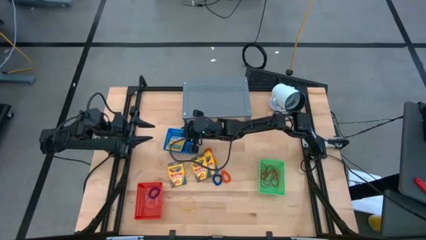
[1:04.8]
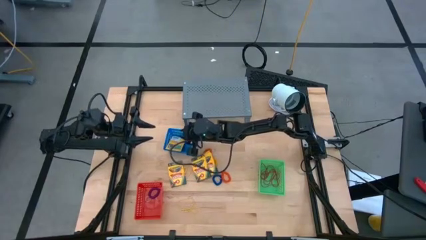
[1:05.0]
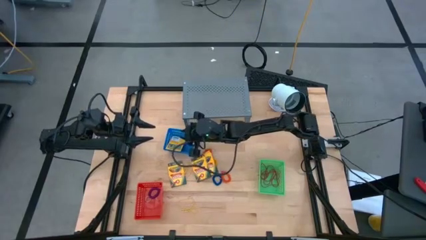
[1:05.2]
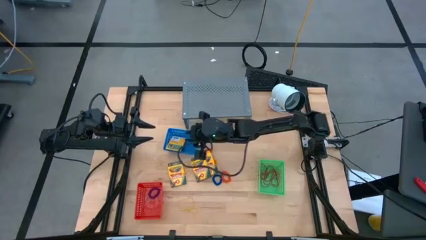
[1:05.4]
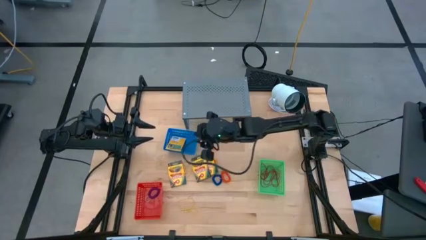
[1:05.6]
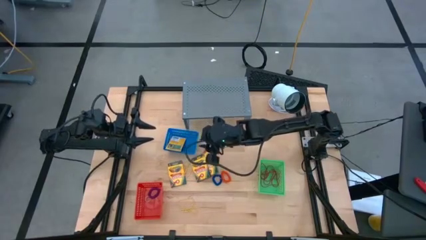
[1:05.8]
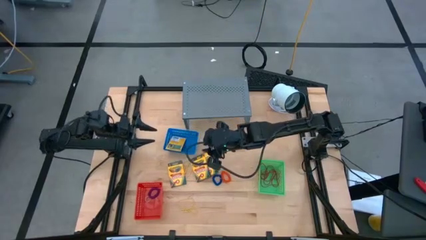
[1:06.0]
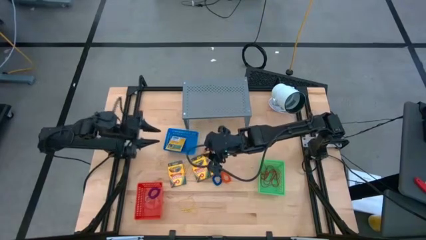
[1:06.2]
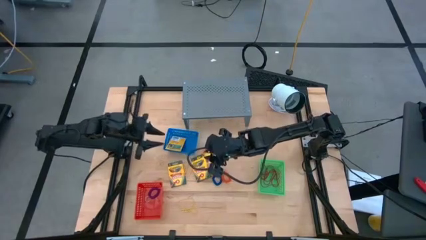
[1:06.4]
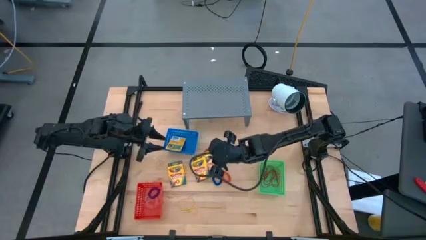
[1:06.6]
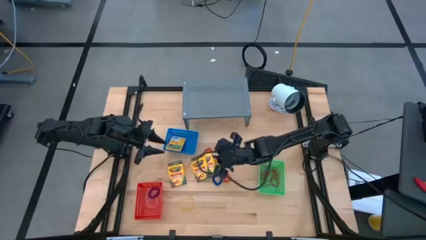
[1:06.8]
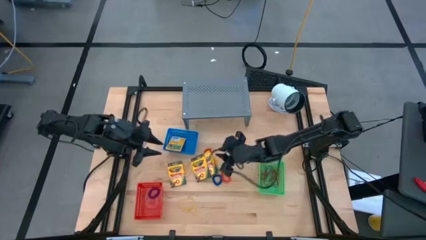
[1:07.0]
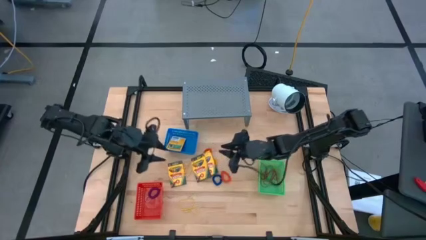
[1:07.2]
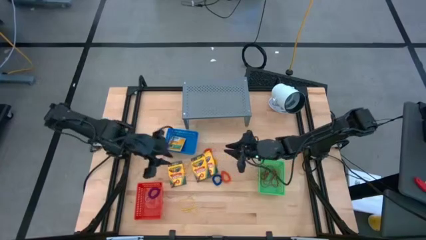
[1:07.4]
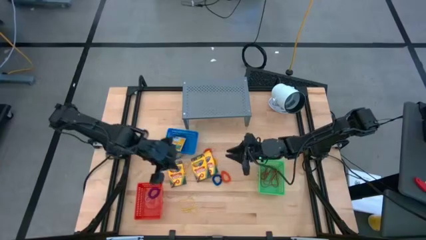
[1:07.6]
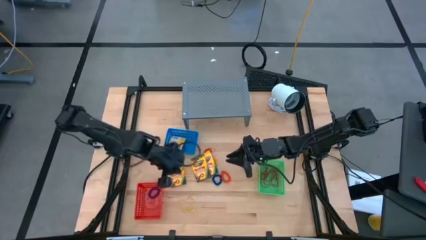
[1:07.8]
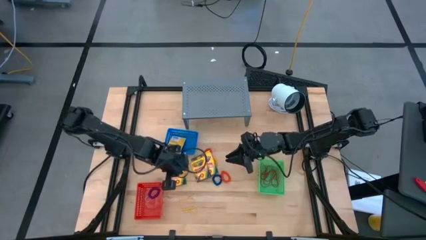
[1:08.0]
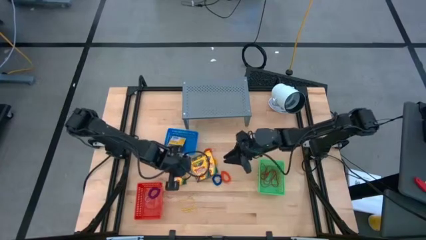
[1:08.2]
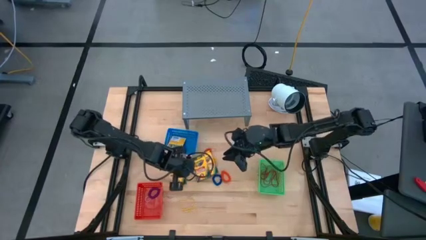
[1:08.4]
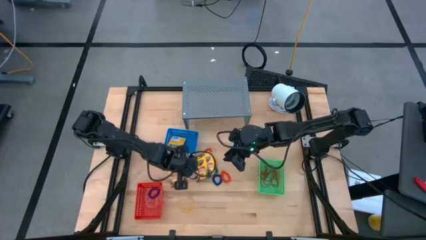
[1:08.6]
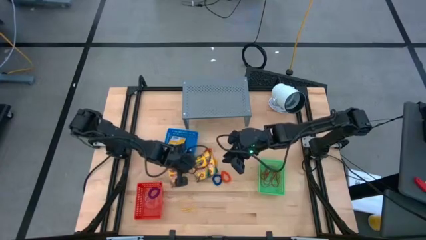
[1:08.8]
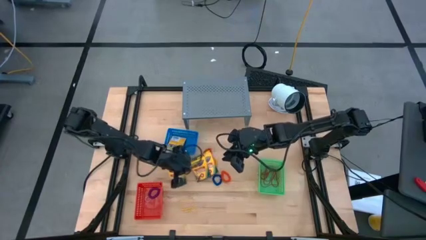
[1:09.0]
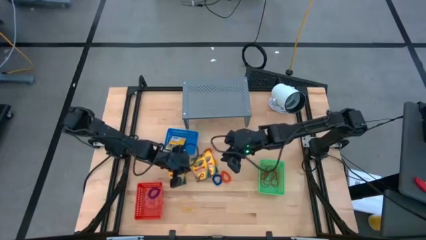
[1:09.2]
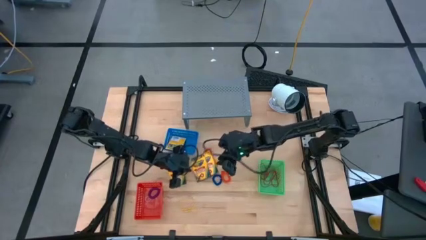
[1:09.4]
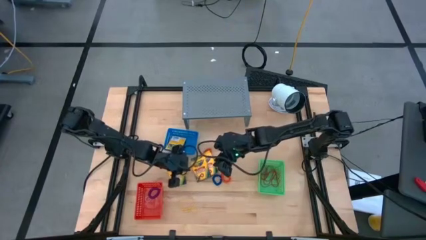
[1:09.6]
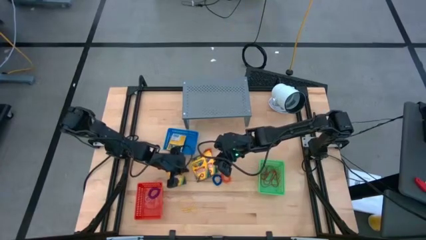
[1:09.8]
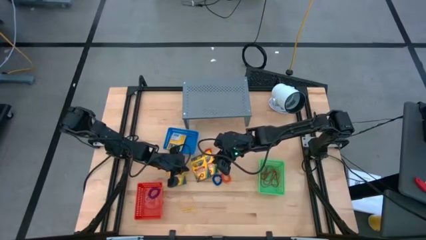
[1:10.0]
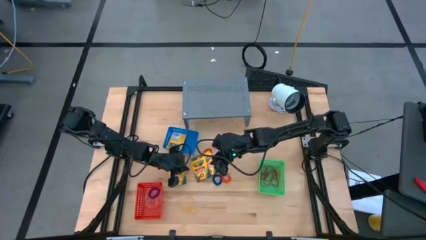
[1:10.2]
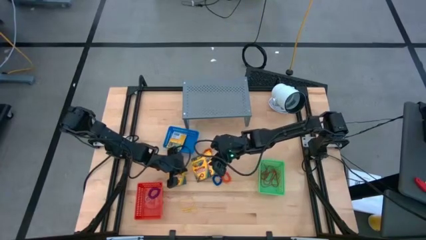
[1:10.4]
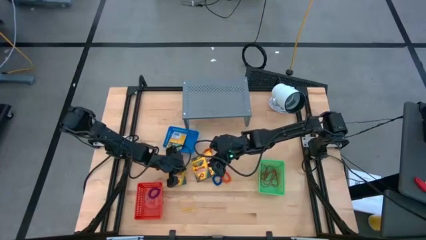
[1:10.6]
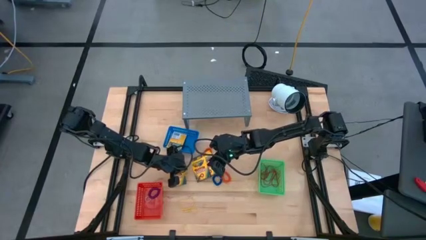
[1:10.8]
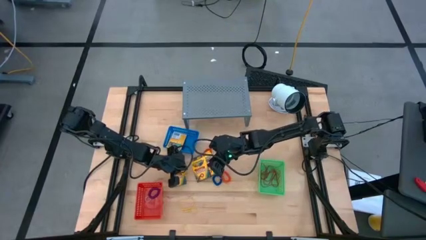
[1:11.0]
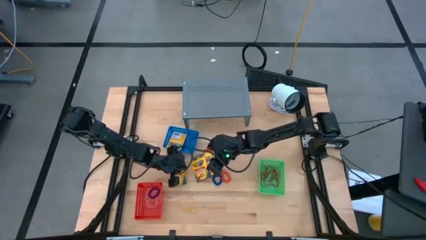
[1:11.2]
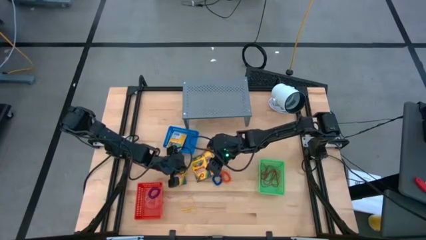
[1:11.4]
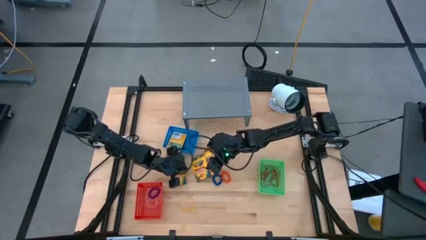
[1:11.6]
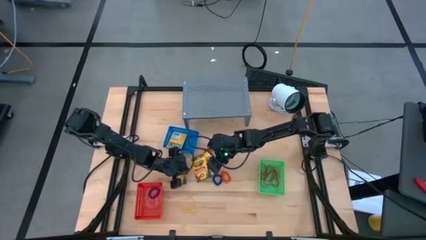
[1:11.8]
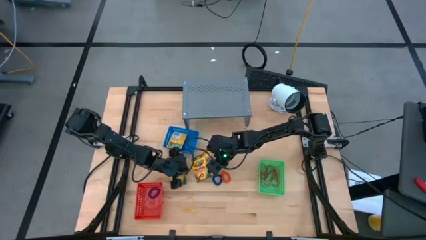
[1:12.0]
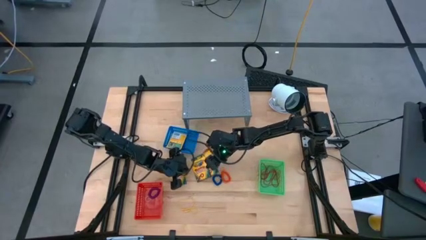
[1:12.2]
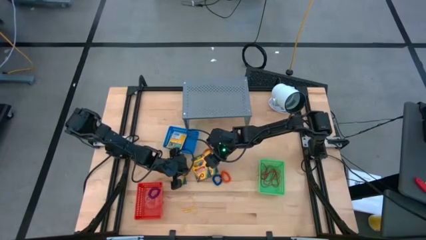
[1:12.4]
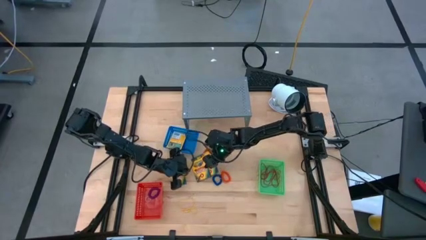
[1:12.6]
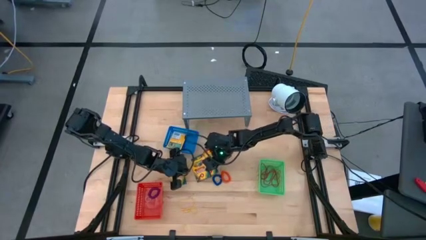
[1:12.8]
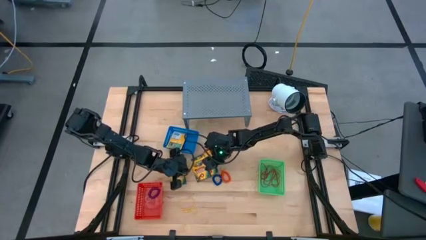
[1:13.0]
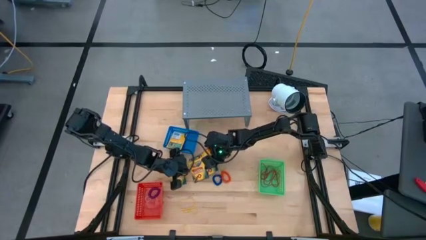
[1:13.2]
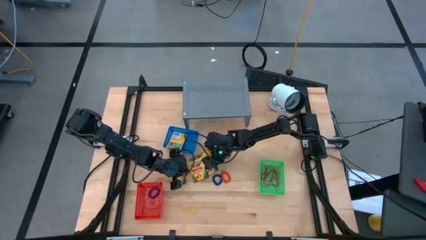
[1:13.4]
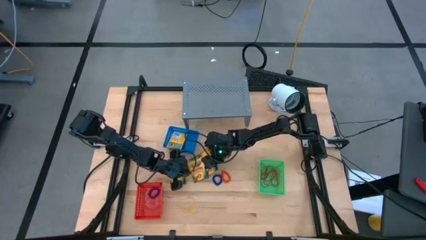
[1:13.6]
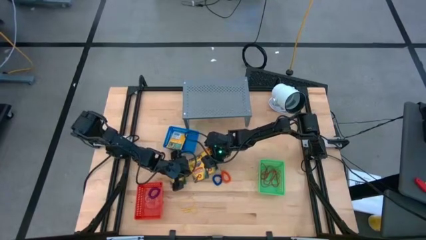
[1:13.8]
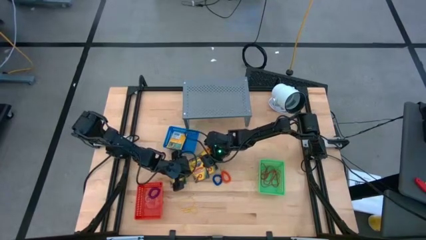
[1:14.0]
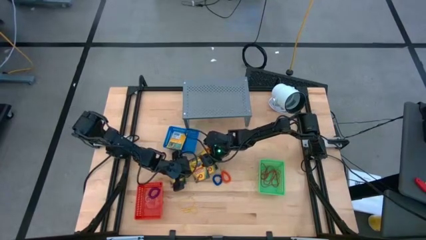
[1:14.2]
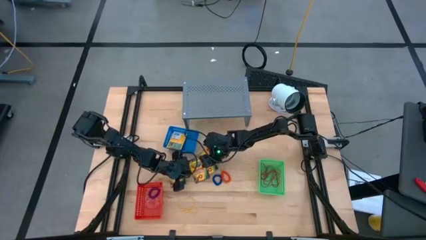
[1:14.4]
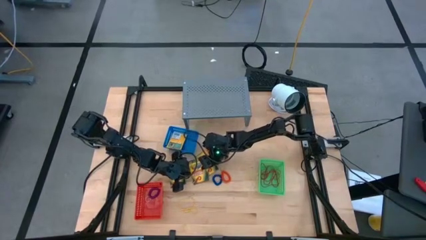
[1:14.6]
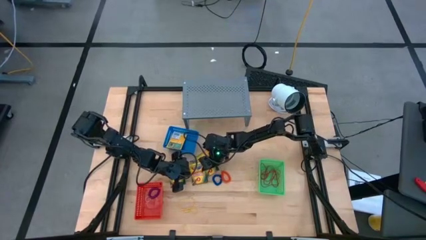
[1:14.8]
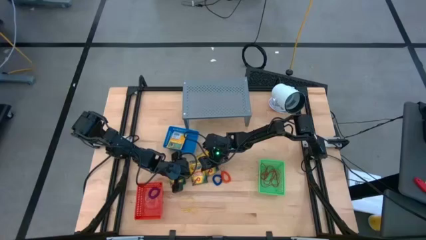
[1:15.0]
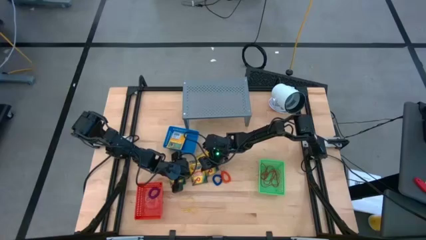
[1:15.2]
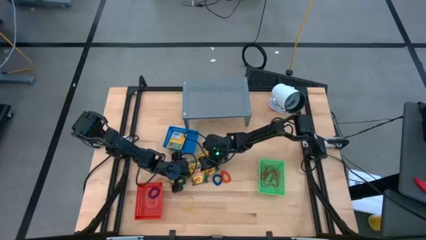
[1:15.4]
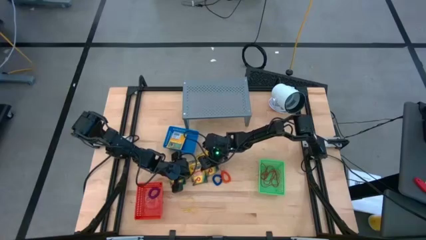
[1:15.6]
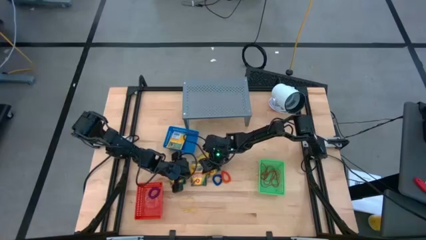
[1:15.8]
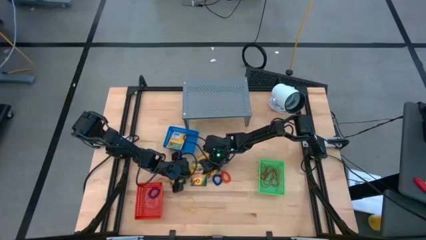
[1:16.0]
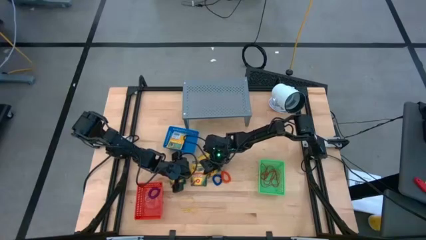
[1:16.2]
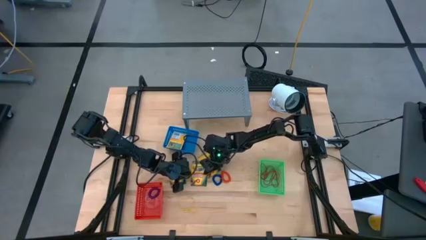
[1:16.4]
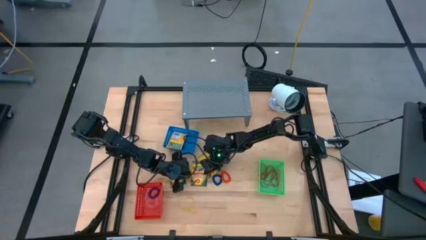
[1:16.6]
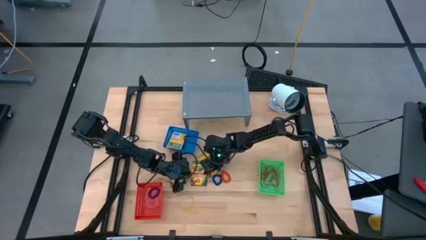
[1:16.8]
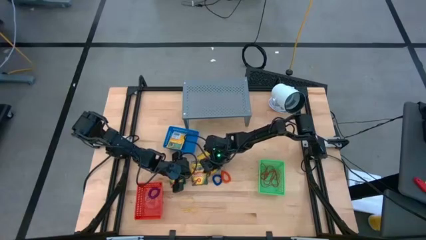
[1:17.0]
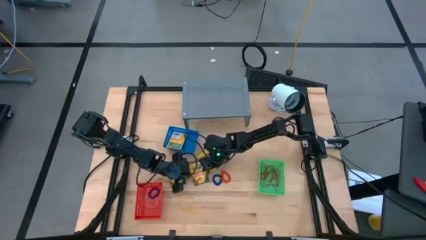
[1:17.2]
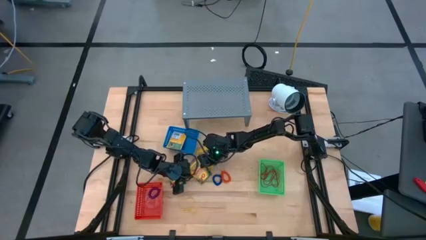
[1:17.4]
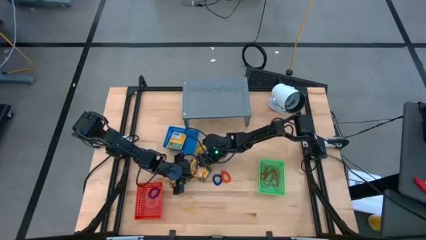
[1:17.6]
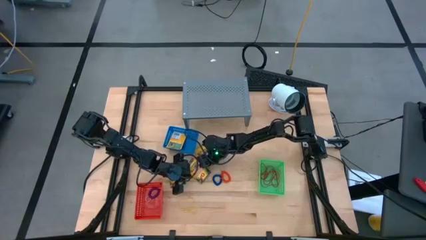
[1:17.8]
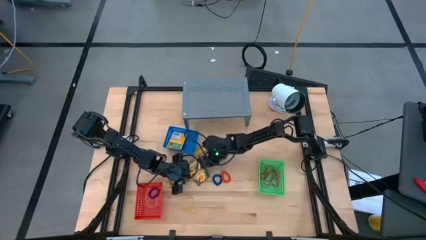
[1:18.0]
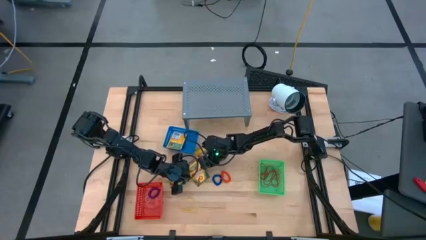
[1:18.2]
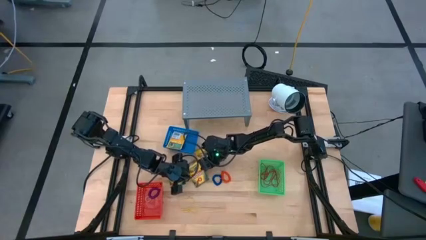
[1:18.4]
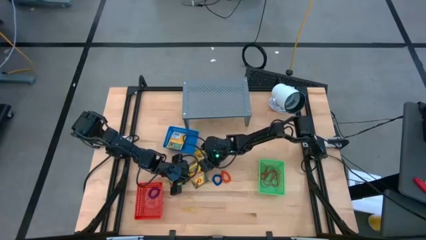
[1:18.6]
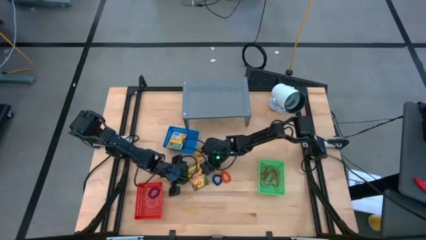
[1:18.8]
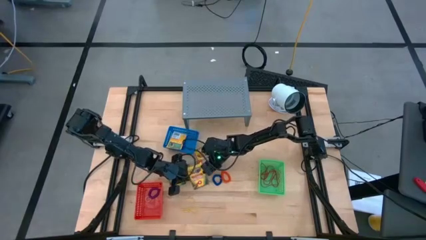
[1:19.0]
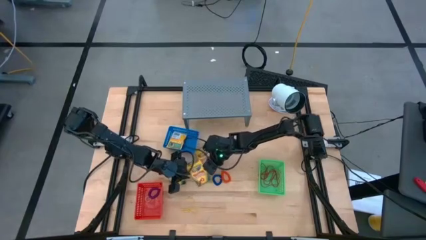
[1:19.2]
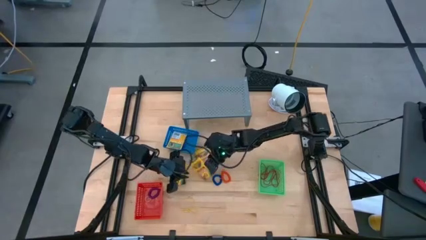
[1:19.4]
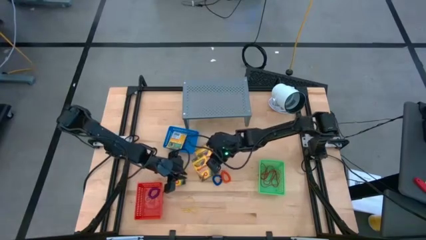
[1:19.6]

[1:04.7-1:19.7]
Task: Pick & Place Office Desk Supplies
Put the yellow crayon box into the blue bin
